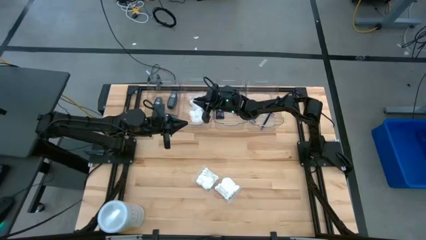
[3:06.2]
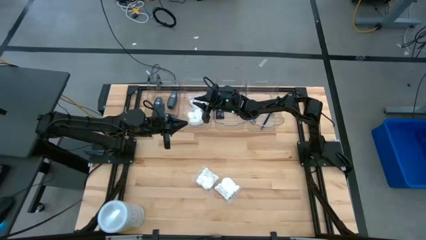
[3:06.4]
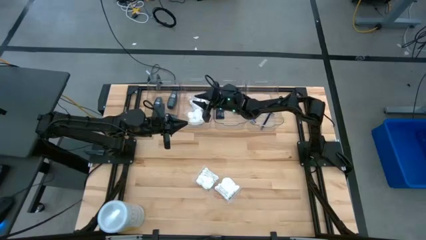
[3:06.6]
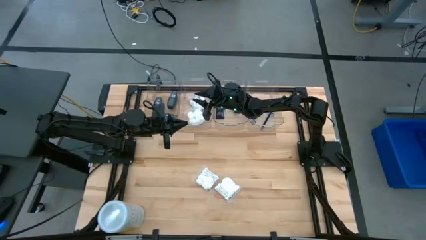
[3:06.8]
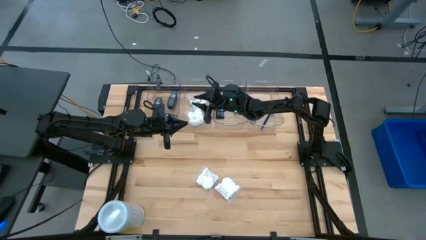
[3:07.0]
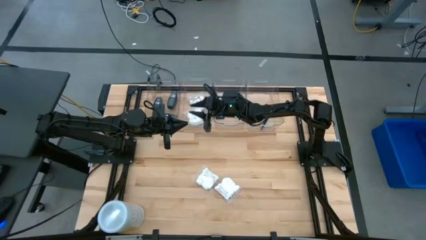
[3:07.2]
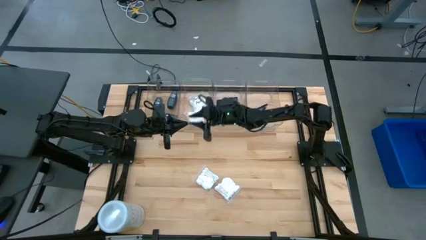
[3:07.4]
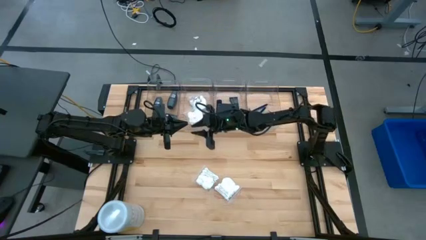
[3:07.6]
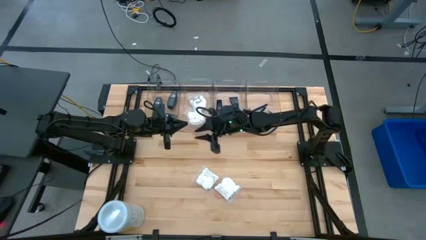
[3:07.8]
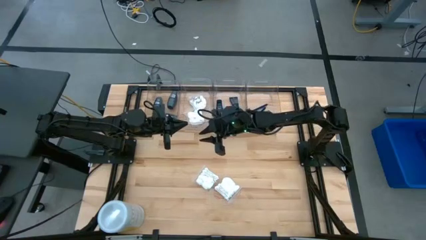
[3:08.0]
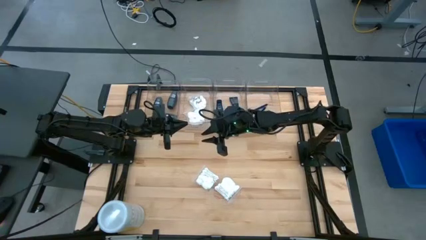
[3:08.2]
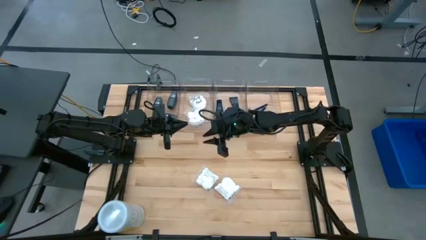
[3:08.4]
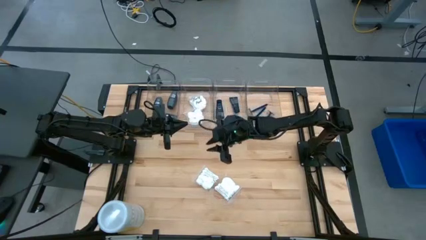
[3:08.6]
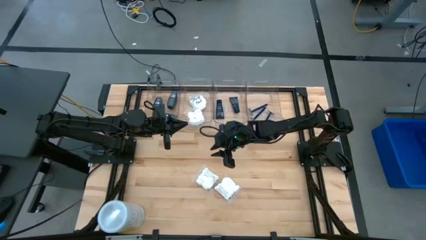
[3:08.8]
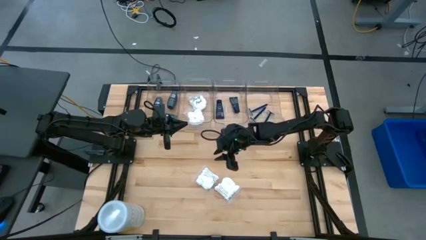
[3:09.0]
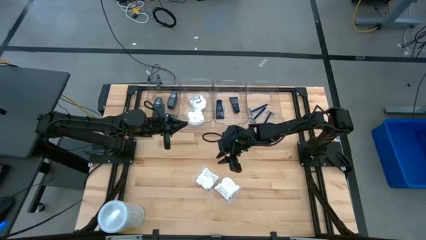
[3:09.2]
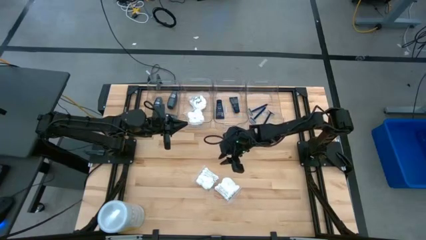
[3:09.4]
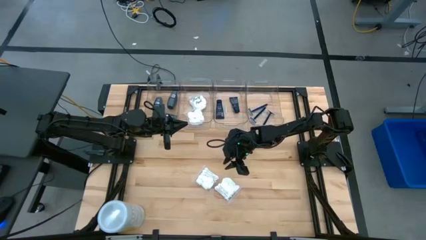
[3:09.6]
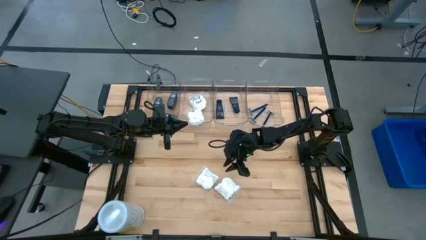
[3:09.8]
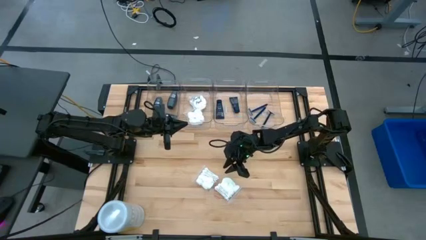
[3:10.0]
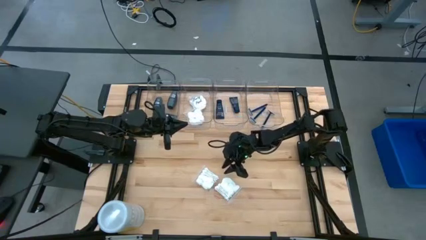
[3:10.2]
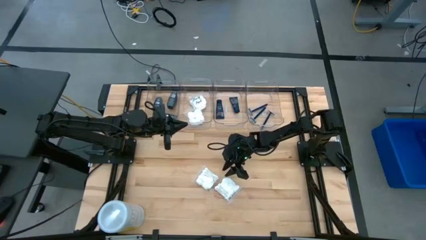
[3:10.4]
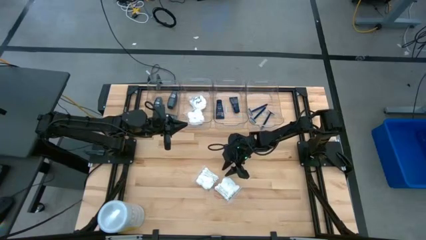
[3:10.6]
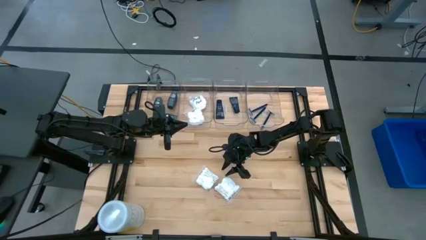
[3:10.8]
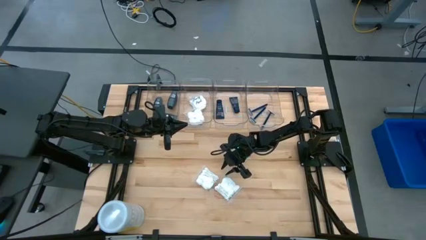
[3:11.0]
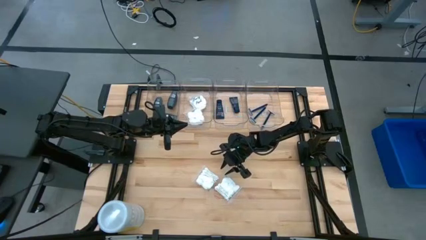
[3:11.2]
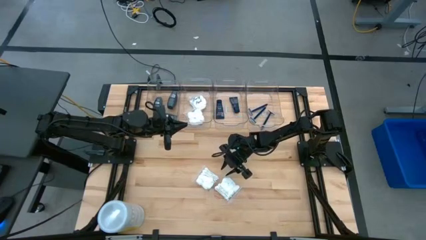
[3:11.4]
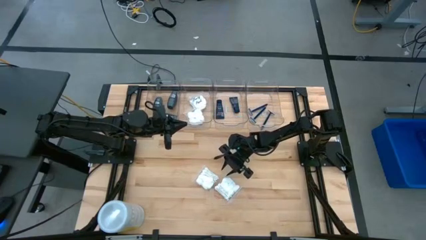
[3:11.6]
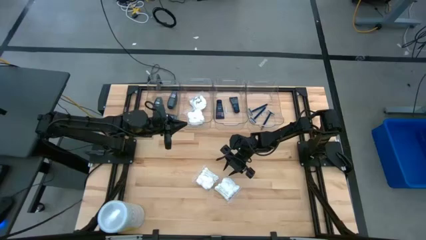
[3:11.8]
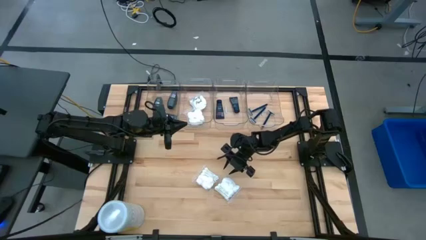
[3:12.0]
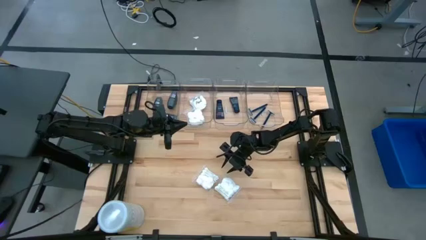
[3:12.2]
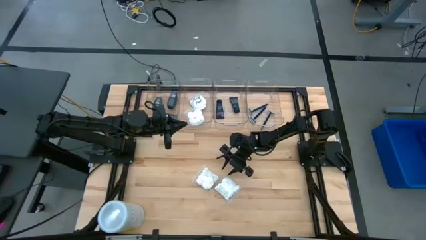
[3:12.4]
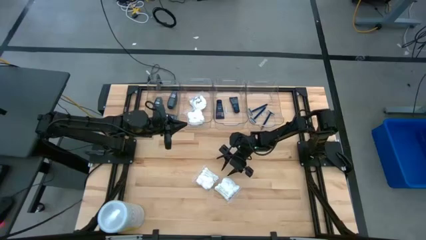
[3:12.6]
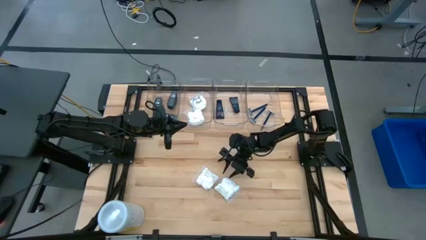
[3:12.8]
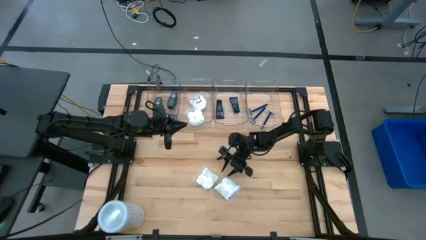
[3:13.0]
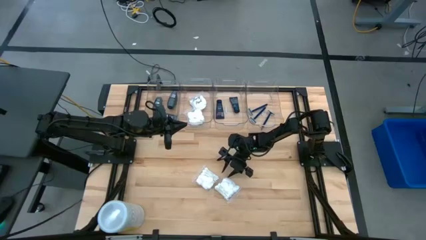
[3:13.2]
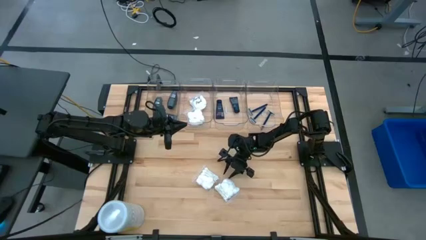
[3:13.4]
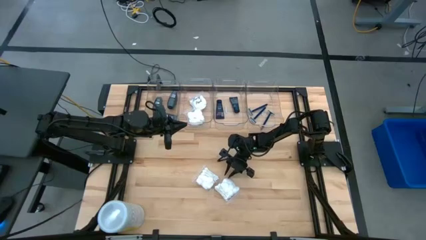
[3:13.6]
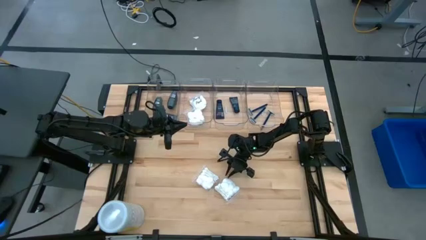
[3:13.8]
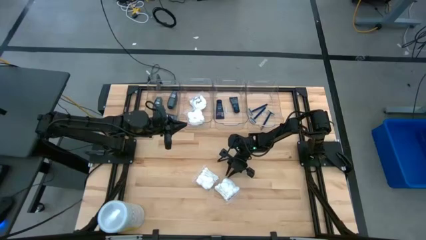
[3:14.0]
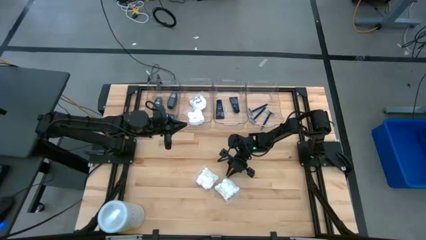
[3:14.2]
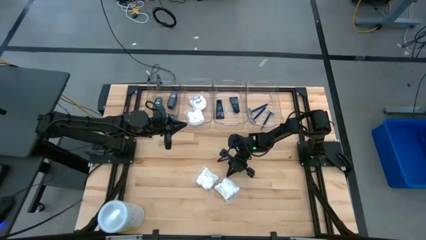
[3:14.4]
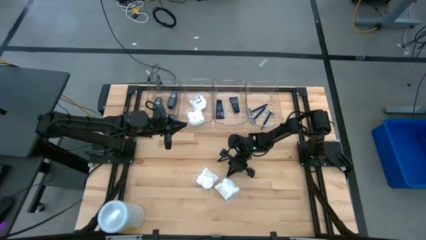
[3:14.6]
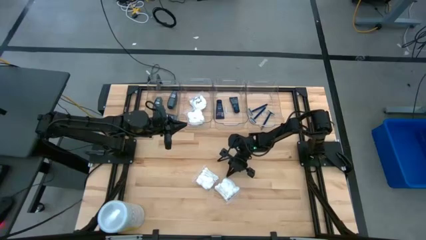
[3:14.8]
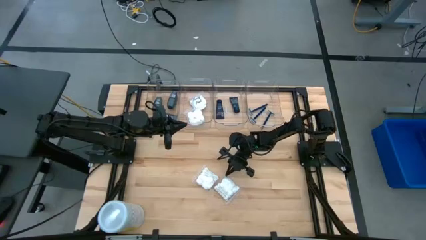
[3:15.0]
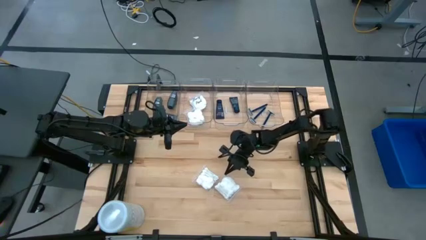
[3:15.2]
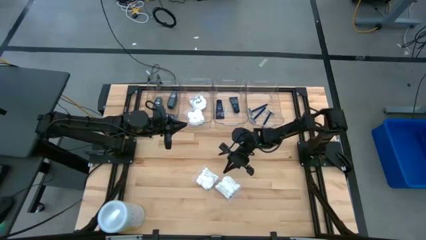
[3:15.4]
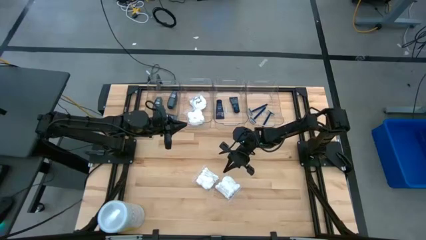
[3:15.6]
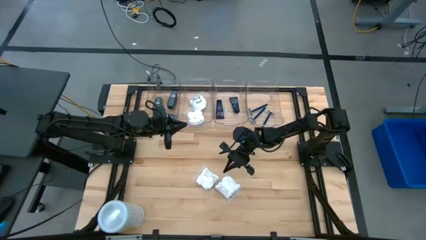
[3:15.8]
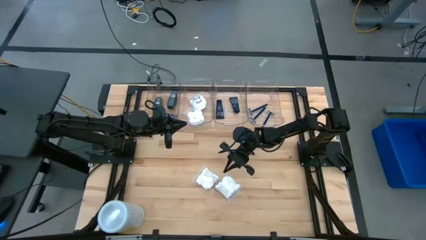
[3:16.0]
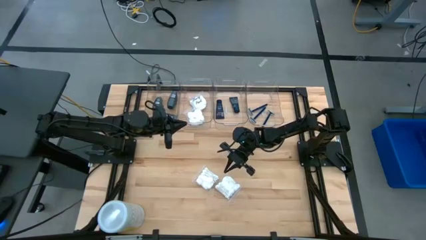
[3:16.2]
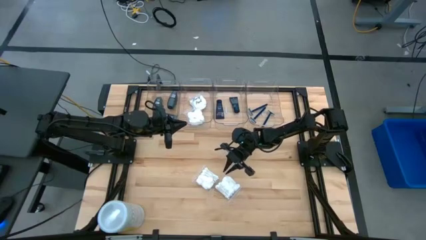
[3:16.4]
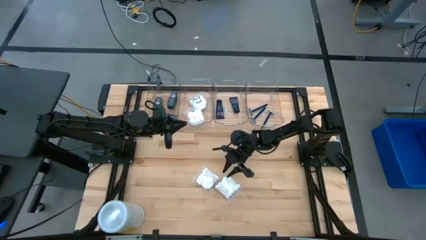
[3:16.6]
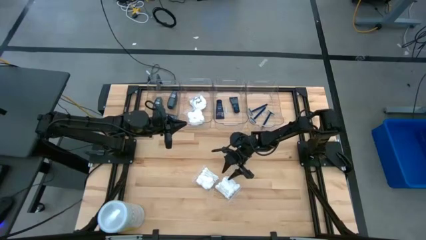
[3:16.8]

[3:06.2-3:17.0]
Task: Pick & Place Travel size toiletries
Put the white vanity pack into the middle left transparent bin

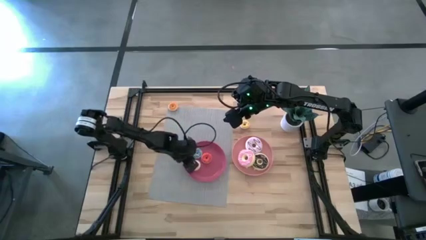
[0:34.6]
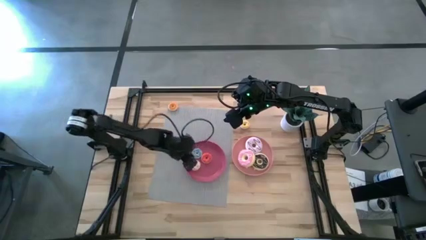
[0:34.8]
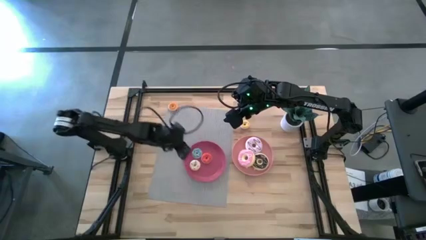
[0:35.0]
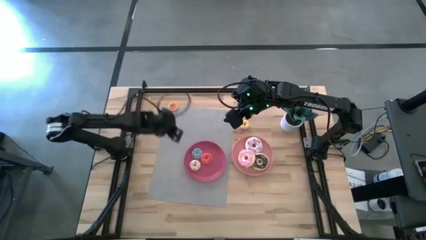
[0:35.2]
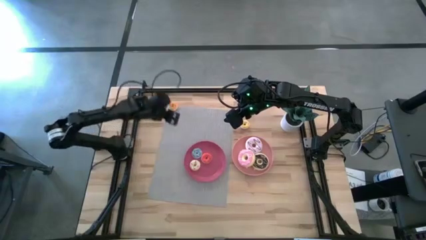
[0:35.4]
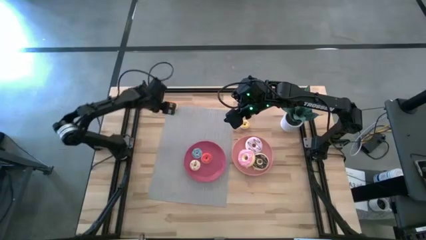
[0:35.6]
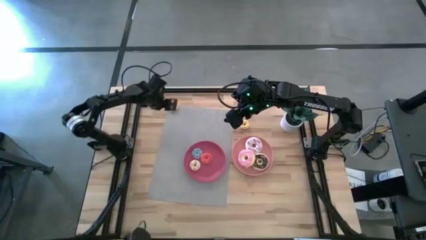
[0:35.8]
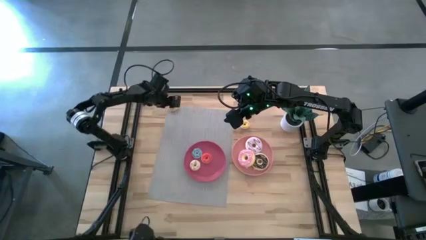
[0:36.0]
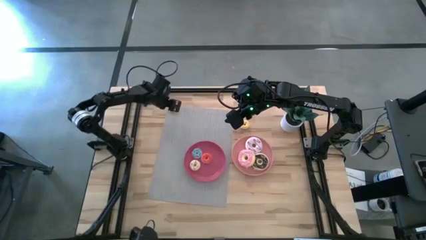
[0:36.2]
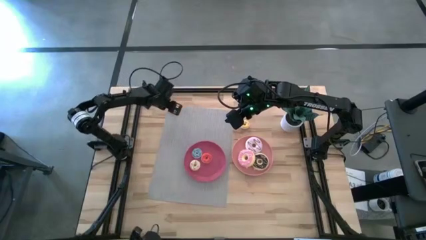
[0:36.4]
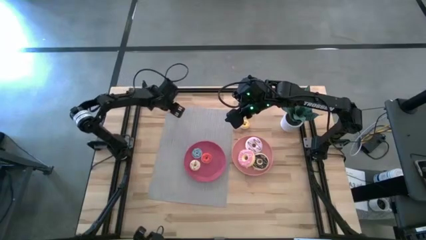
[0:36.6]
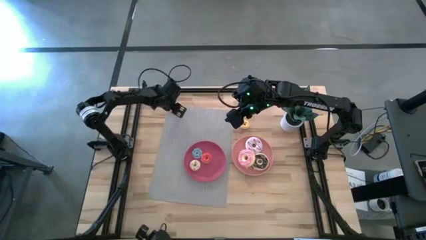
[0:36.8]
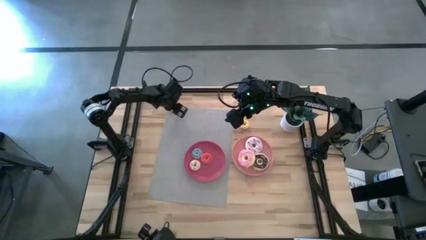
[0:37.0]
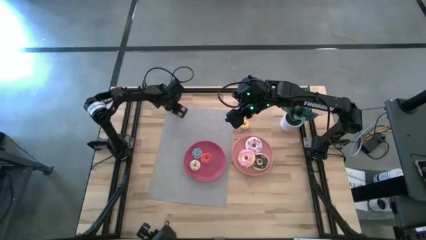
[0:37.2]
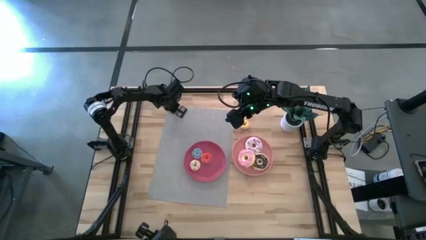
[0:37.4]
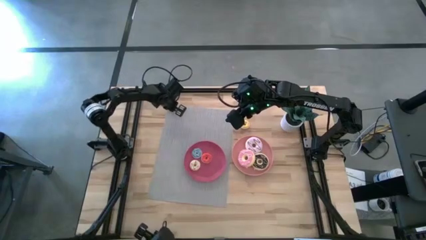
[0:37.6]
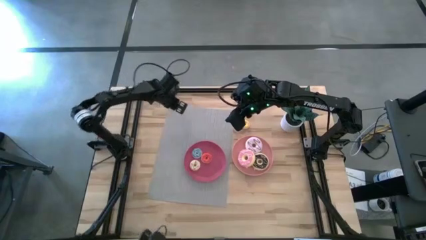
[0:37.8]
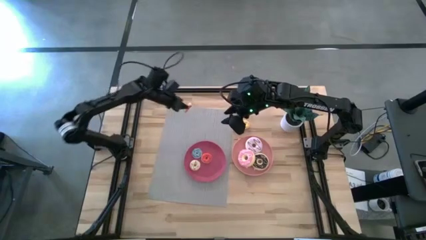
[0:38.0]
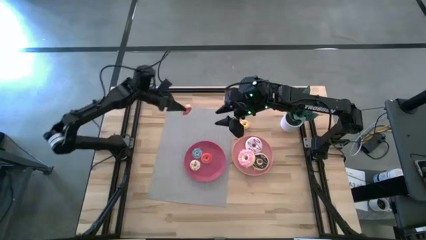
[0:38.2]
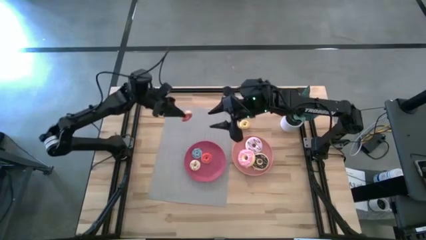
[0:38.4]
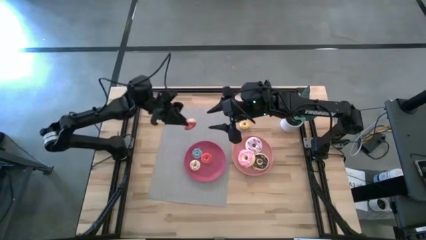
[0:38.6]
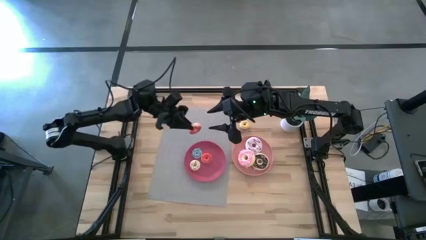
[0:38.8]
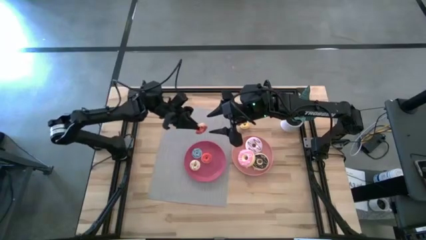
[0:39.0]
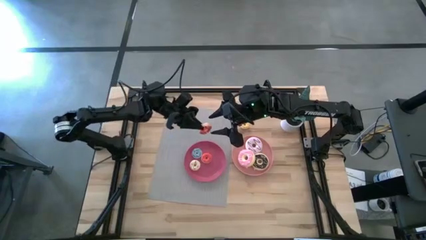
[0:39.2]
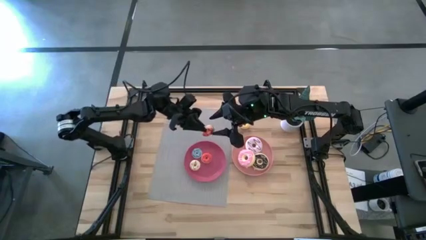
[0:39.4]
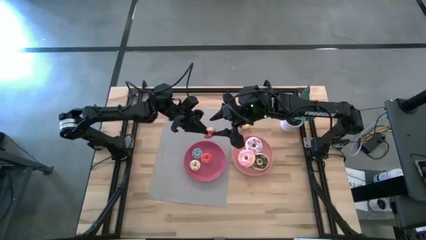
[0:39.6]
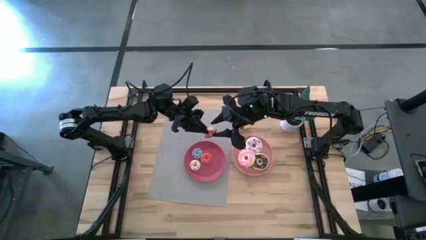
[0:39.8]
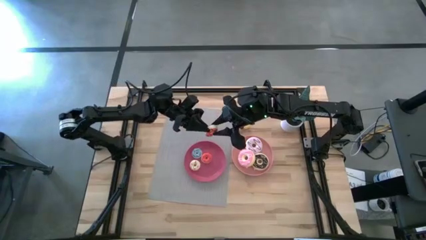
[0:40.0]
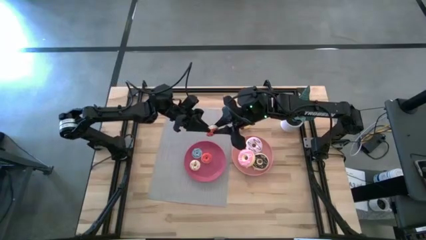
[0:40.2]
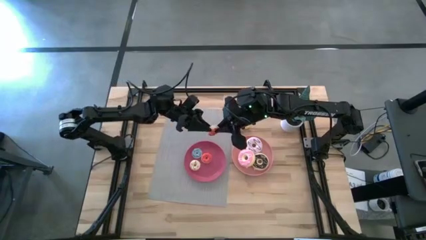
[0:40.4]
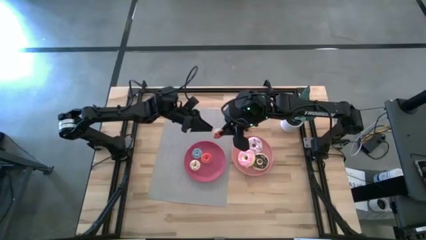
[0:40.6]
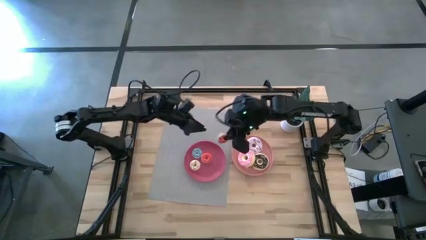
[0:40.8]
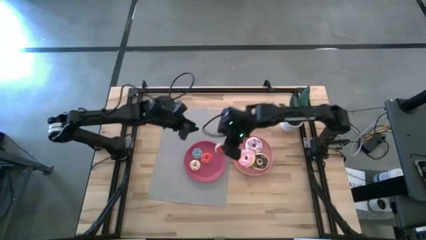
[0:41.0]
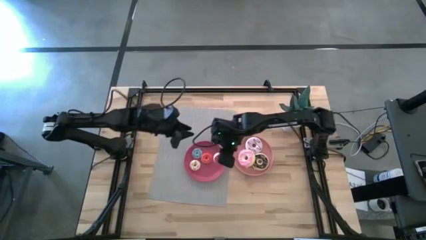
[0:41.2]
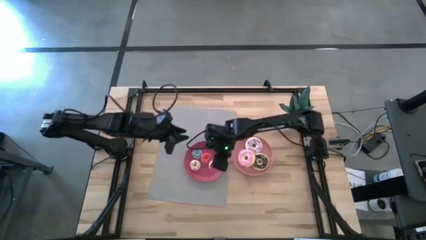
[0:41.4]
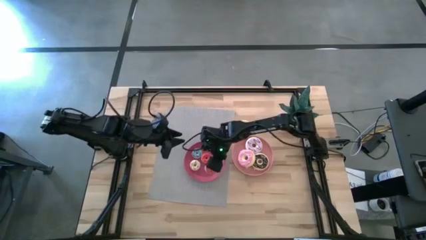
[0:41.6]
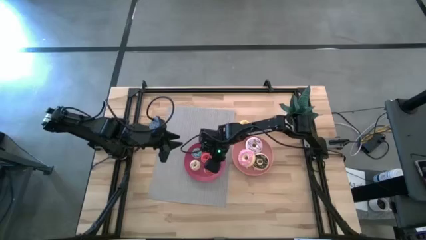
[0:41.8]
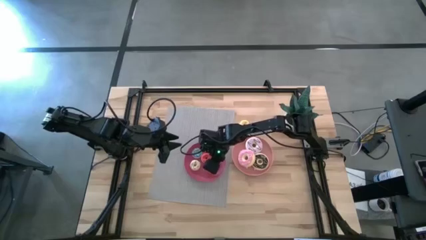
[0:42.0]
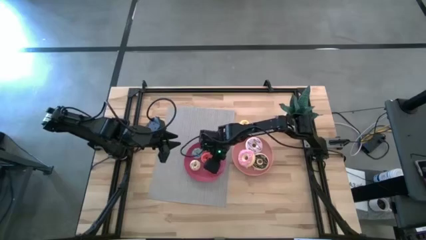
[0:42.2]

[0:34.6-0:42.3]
Task: Pick & Place donuts
Put the small orange donut on the light pink plate
